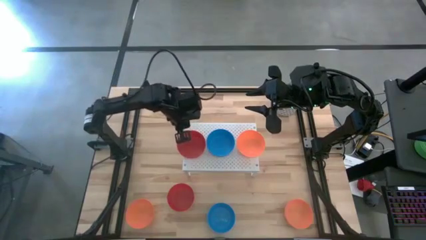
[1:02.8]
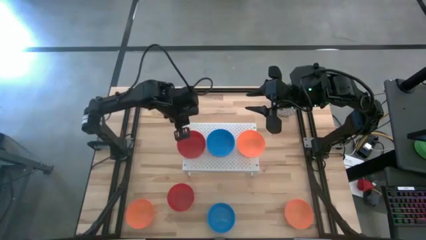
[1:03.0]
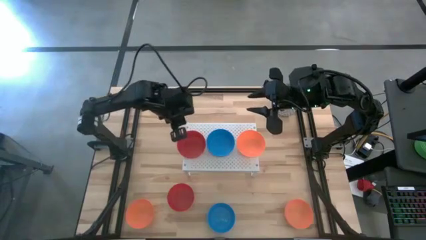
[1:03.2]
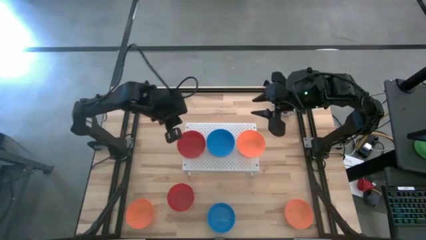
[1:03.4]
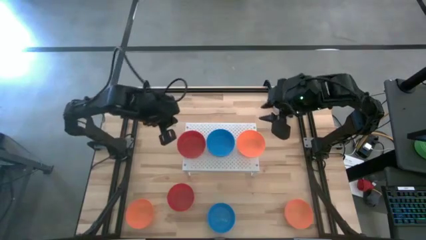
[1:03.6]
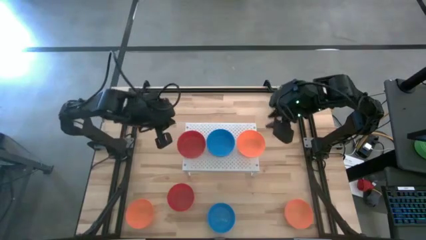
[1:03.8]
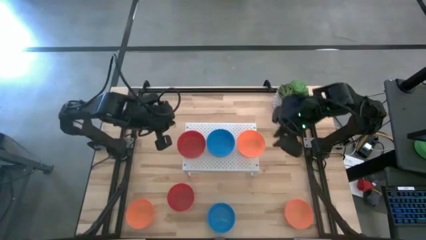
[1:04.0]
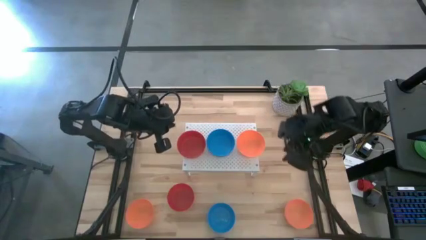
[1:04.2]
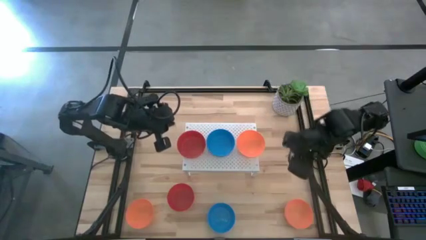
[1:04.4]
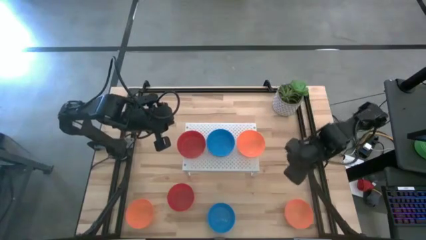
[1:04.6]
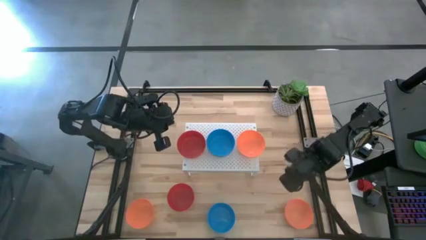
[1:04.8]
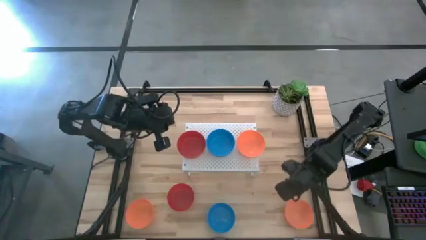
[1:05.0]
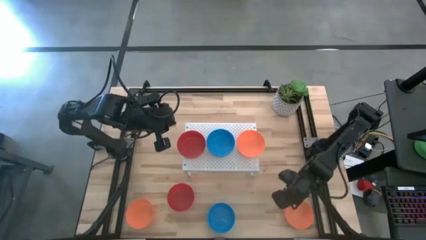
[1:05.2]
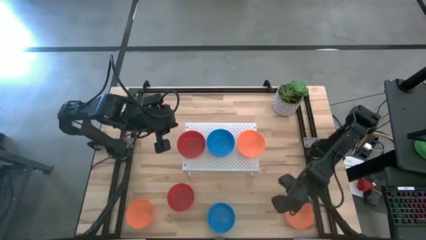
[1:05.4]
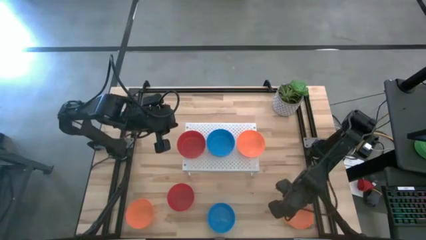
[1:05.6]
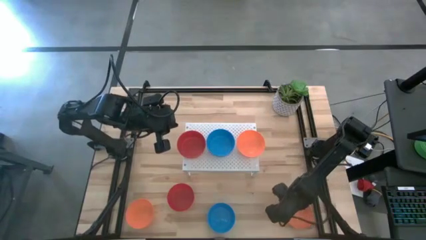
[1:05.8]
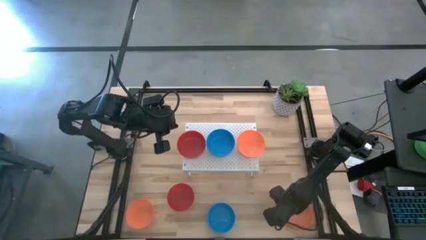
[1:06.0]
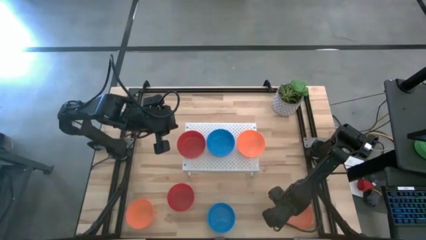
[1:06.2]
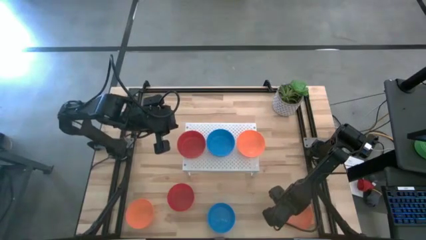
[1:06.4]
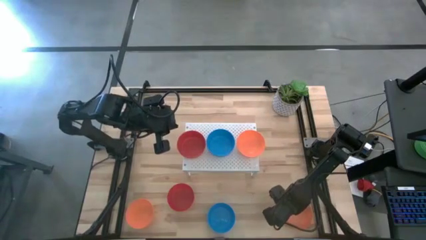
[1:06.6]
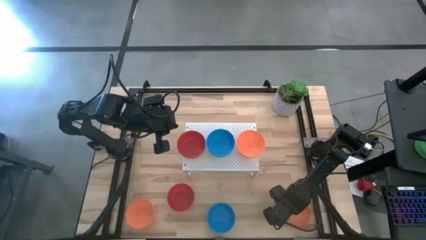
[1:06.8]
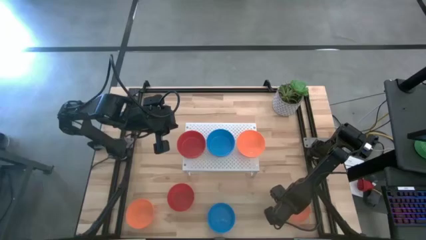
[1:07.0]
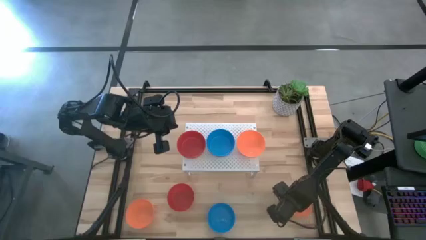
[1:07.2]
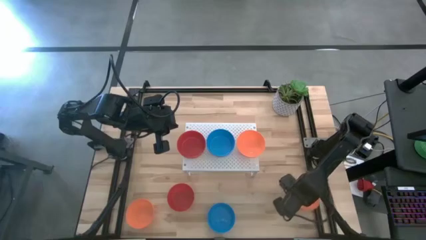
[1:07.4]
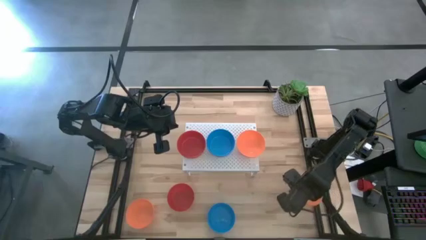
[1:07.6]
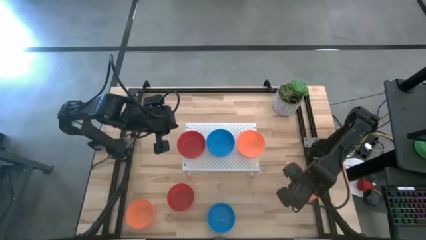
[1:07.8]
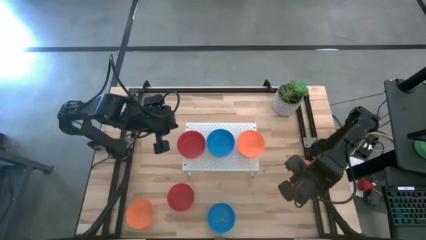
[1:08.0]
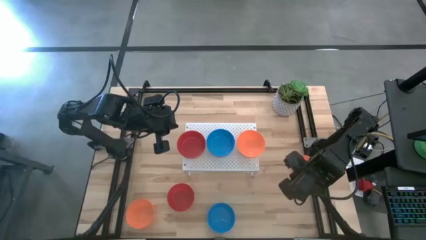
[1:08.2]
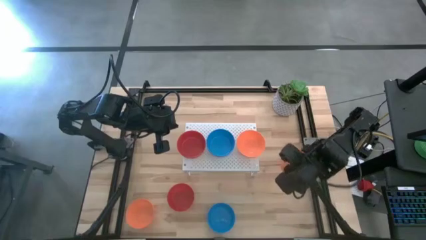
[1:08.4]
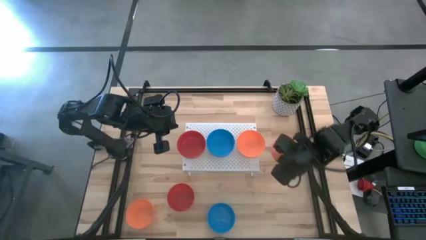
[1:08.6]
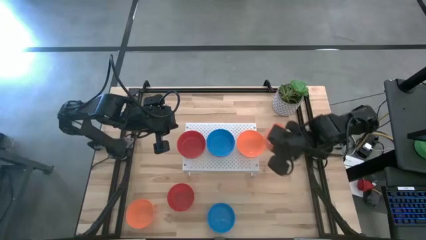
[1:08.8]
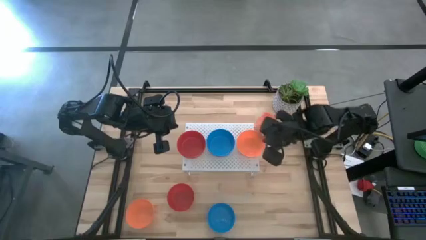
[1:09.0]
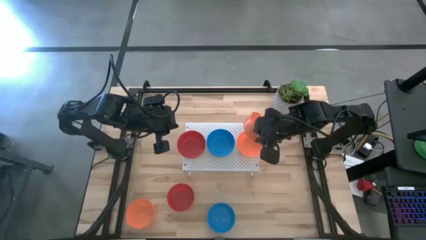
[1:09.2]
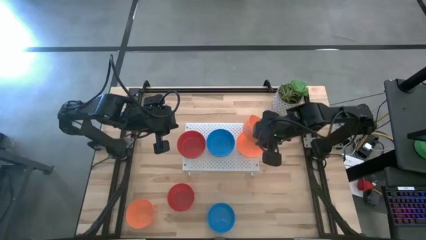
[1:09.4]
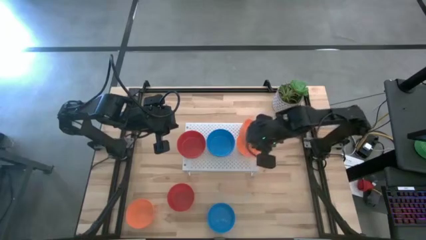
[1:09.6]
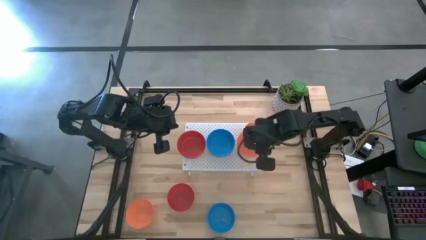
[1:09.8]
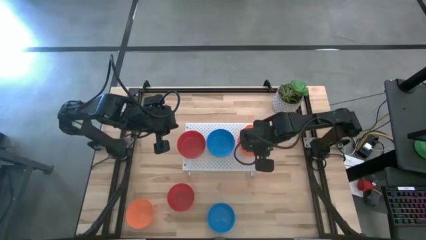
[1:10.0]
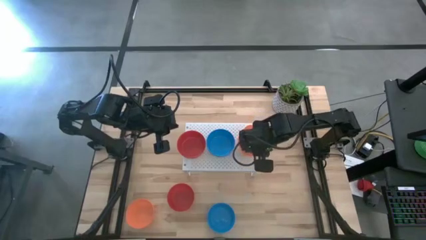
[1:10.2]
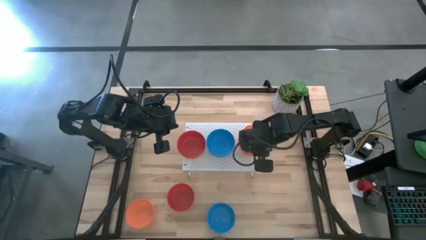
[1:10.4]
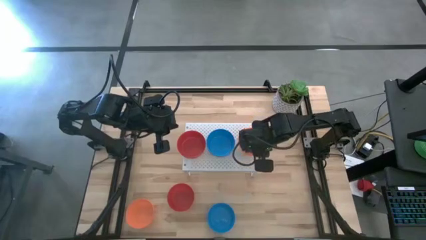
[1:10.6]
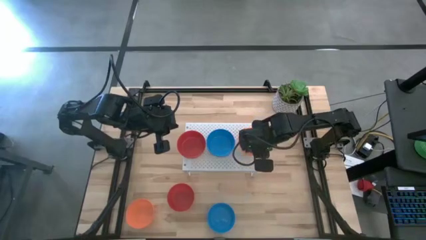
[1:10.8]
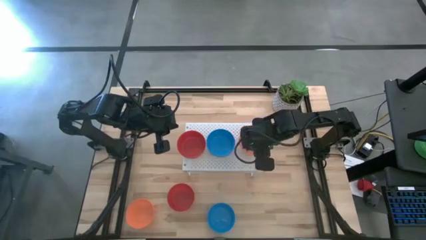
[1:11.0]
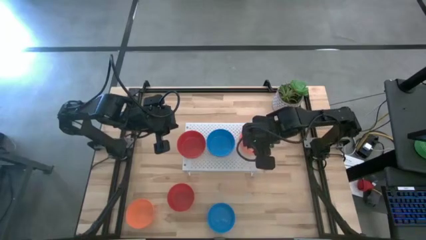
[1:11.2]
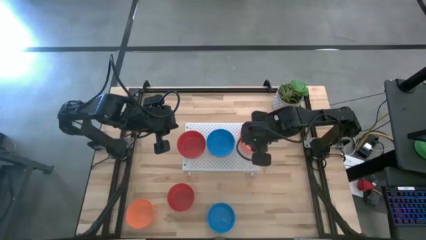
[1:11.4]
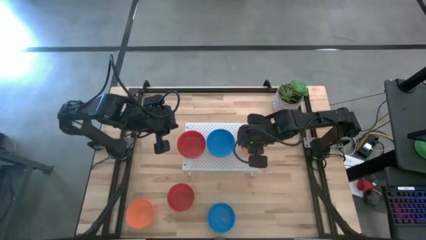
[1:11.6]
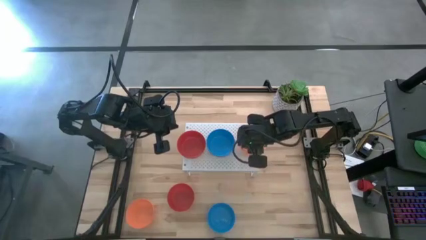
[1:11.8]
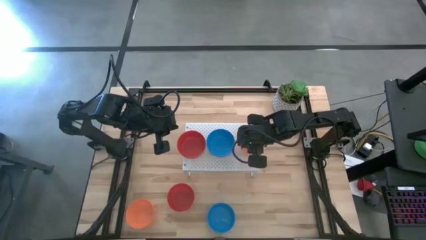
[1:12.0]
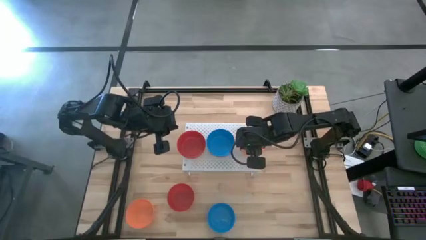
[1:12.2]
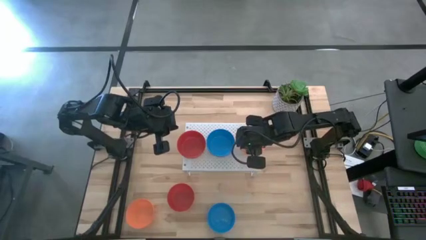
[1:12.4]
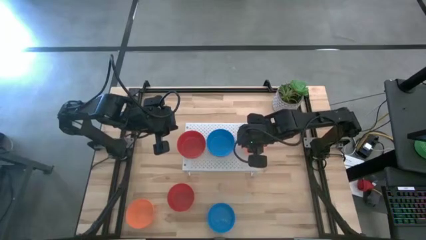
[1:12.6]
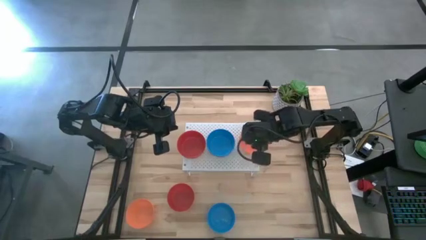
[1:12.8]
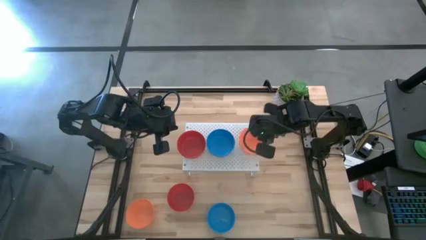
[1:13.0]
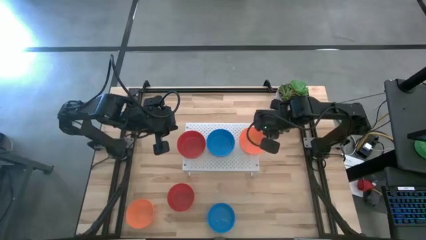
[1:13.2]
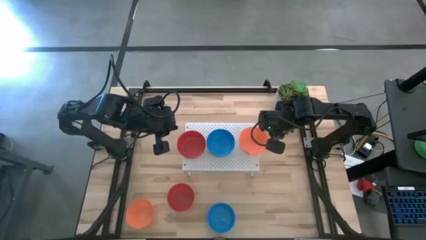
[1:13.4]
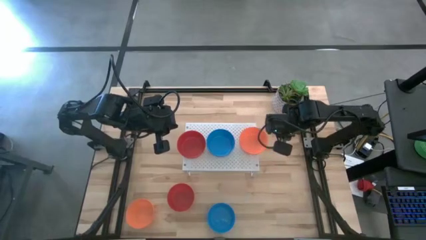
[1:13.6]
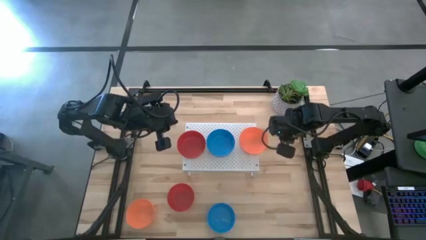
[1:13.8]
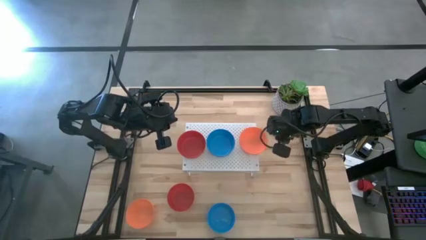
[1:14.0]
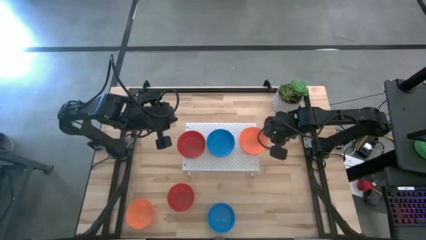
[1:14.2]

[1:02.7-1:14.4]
Task: Pick & Place Mini bowls
Stack the right orange bowl on the orange bowl on the shelf

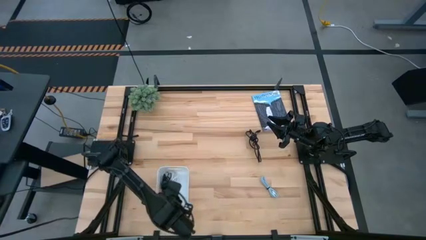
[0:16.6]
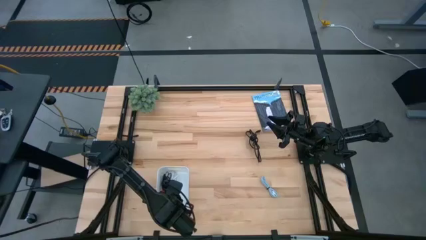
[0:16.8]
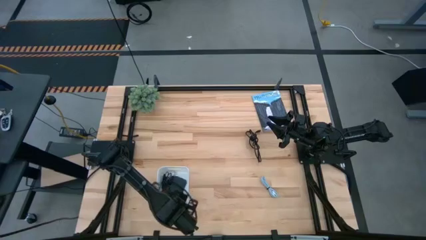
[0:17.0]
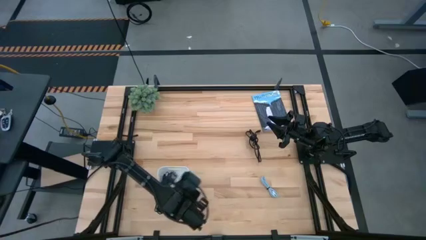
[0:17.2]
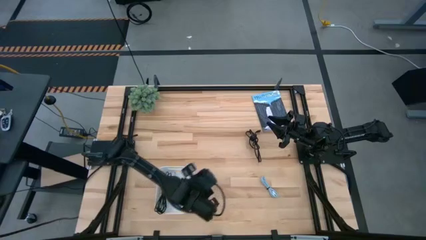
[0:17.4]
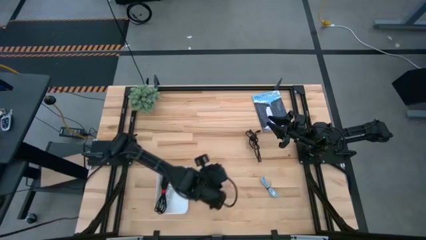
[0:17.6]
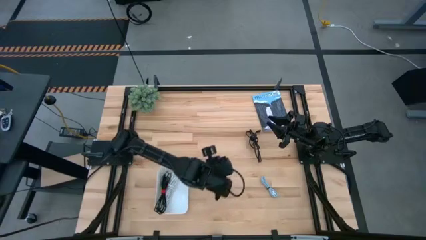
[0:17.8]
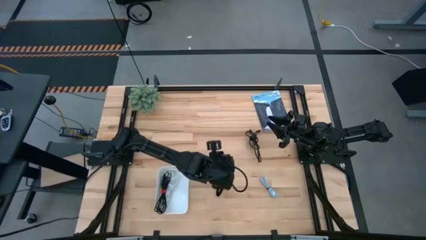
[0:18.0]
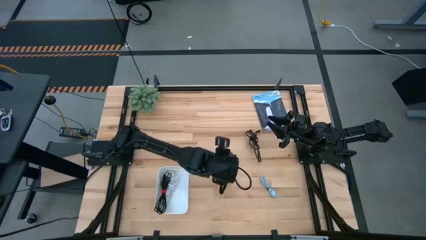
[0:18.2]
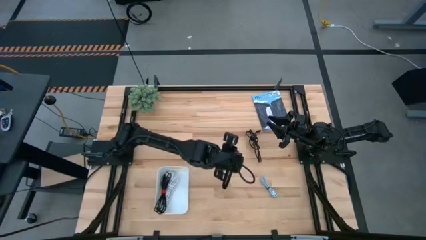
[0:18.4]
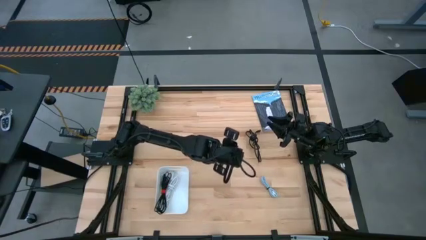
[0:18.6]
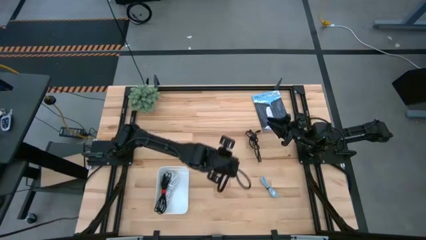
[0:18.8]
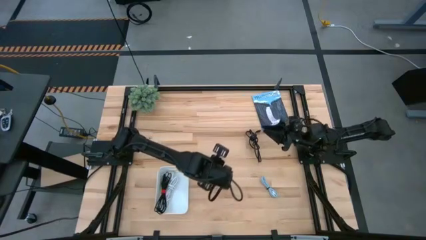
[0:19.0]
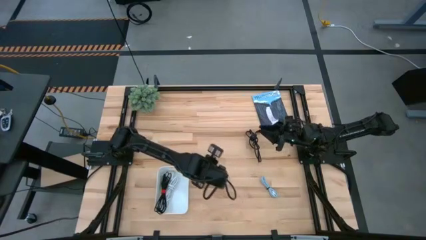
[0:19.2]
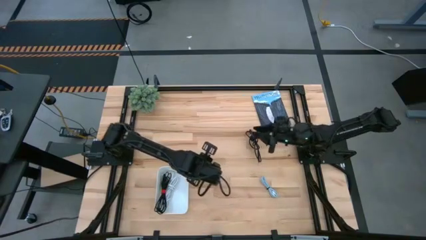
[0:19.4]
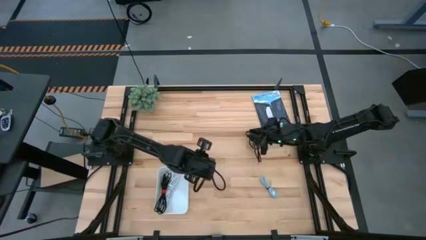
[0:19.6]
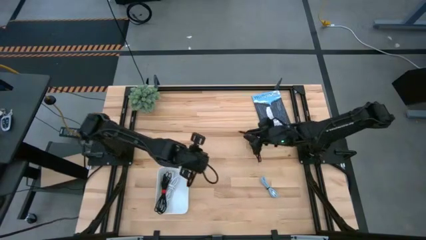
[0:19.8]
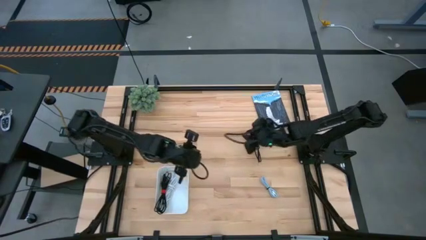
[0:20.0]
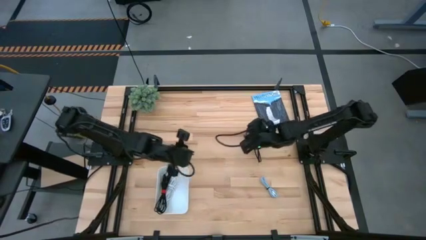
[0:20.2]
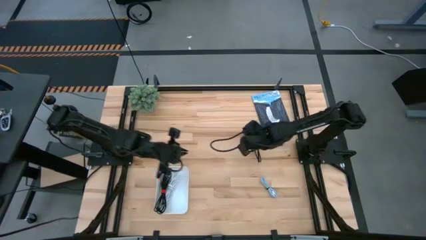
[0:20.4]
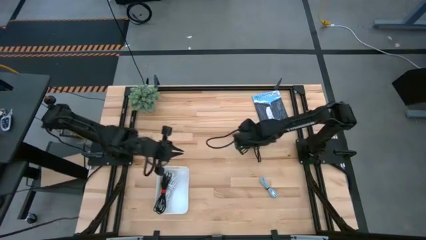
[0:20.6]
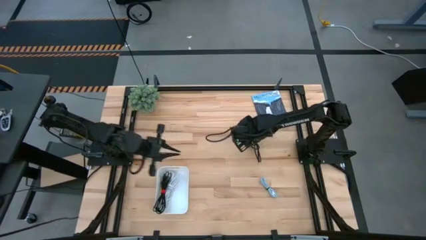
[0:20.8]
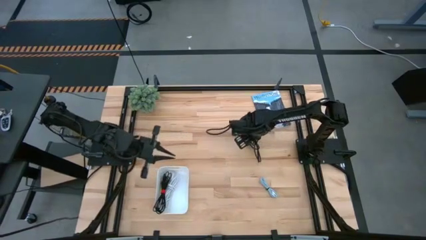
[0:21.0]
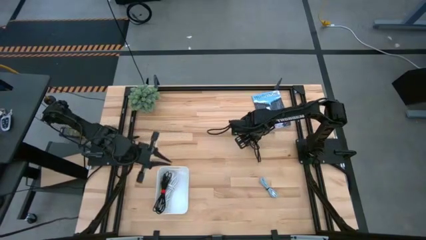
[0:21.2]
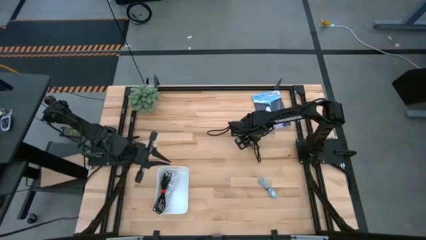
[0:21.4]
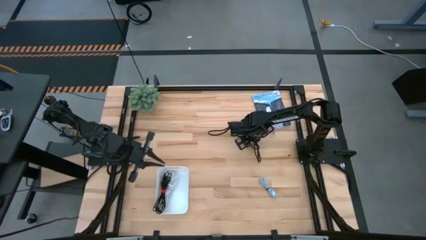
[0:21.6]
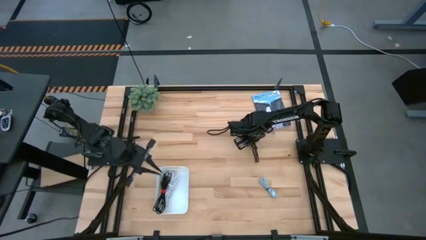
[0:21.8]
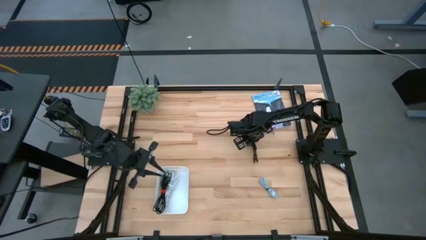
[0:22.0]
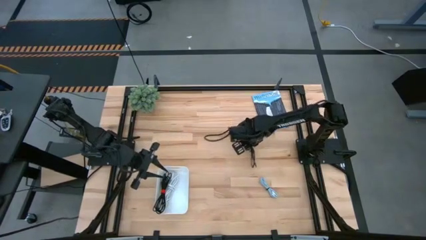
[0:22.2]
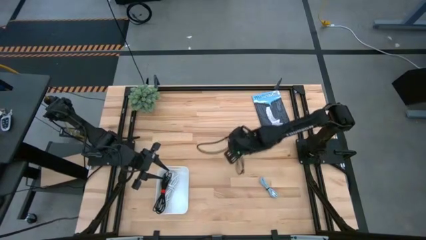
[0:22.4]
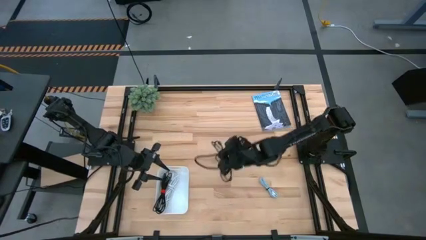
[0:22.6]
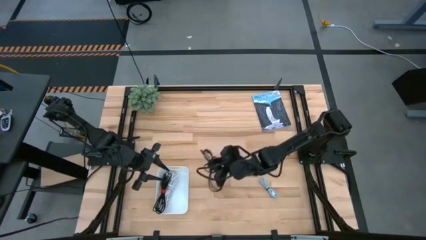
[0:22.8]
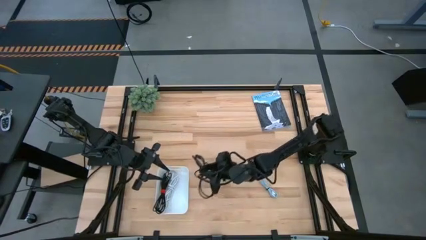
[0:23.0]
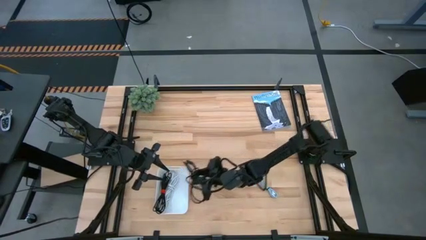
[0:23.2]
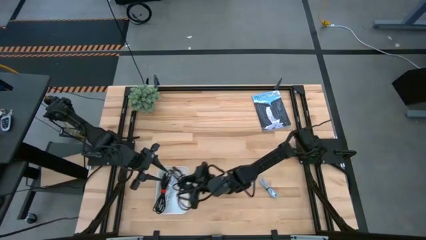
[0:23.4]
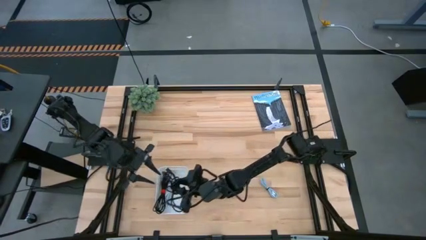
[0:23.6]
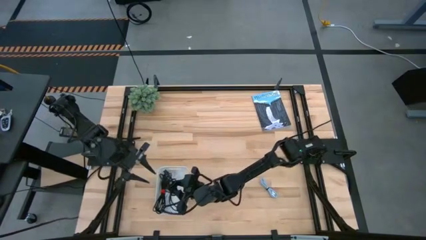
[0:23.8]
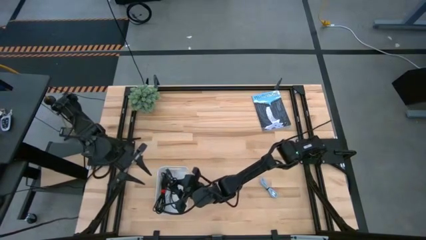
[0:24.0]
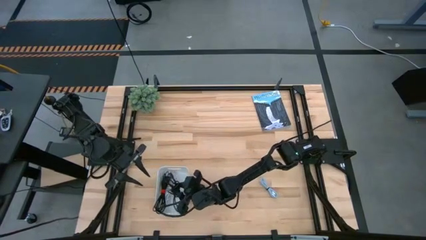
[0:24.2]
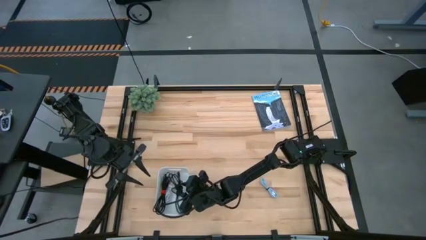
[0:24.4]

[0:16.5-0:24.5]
Task: Pick and place USB-C Cables
Put the black charger cable into the white bin
